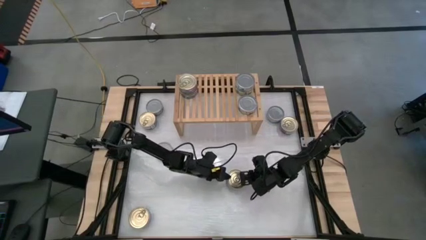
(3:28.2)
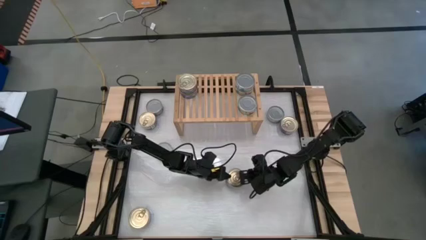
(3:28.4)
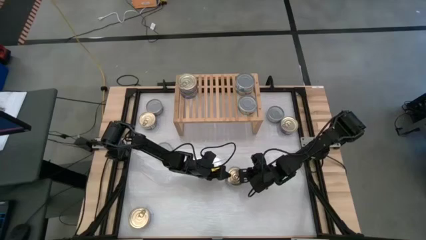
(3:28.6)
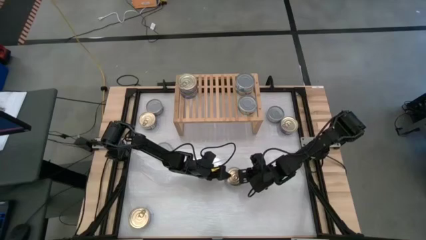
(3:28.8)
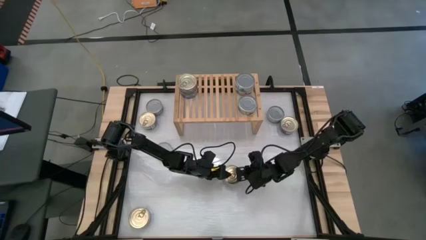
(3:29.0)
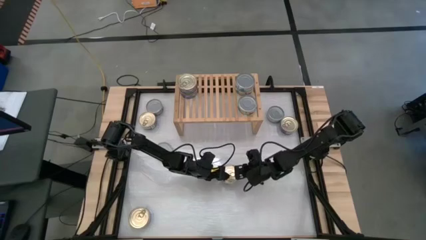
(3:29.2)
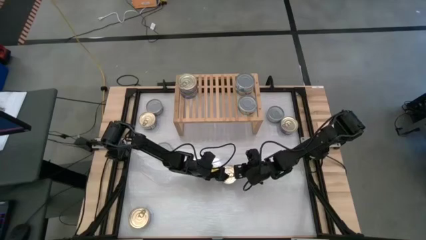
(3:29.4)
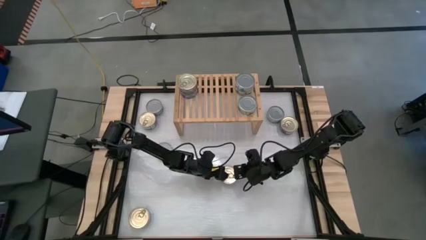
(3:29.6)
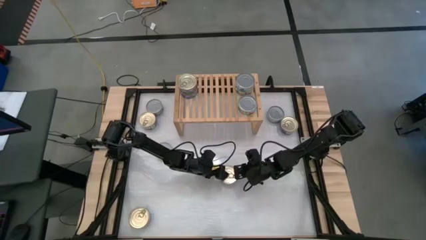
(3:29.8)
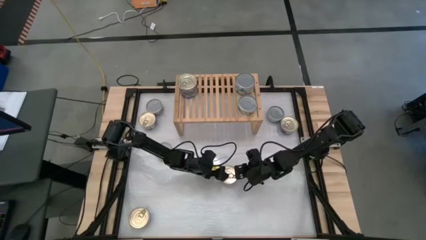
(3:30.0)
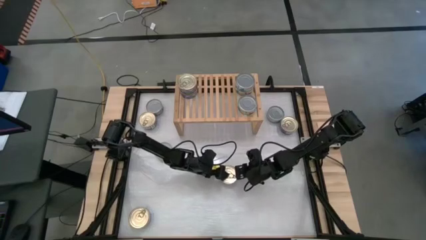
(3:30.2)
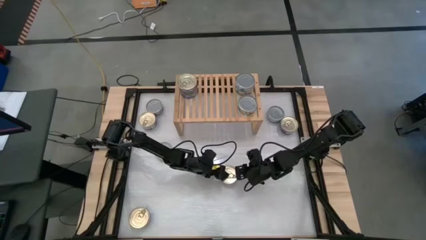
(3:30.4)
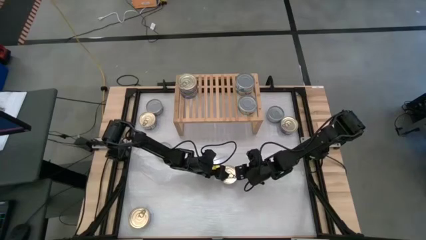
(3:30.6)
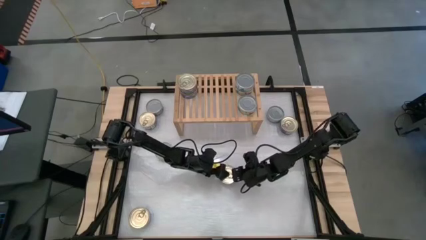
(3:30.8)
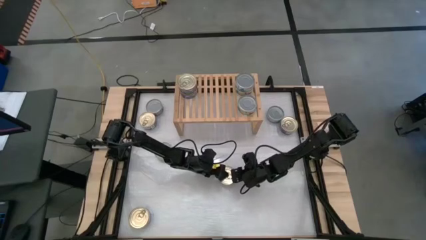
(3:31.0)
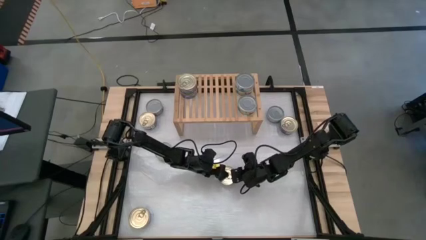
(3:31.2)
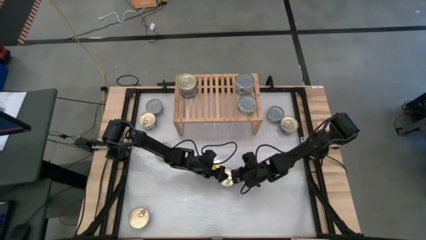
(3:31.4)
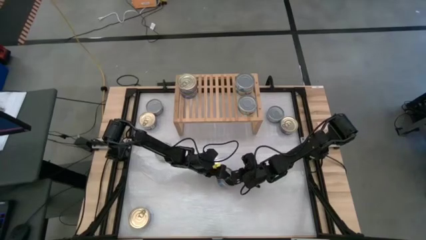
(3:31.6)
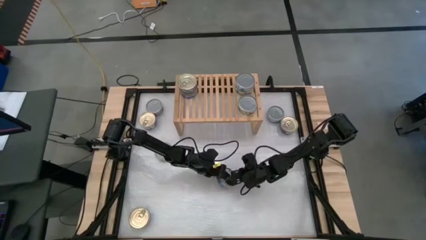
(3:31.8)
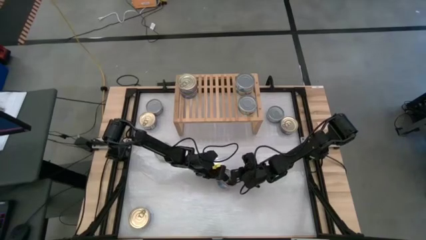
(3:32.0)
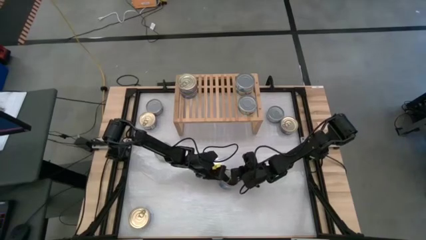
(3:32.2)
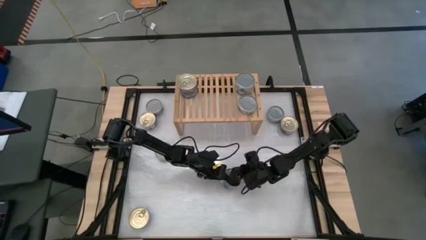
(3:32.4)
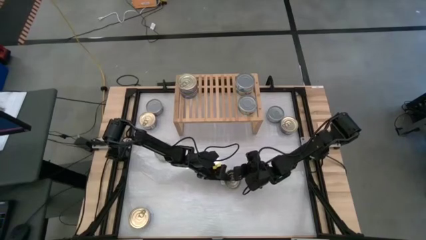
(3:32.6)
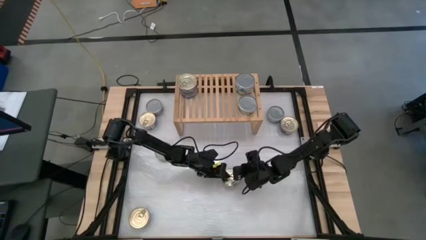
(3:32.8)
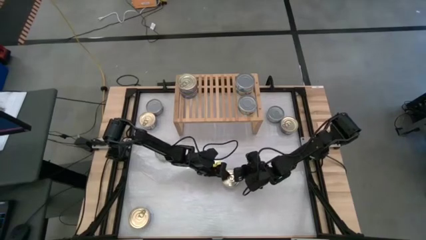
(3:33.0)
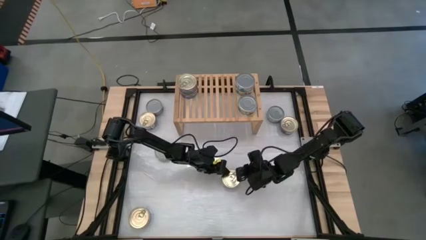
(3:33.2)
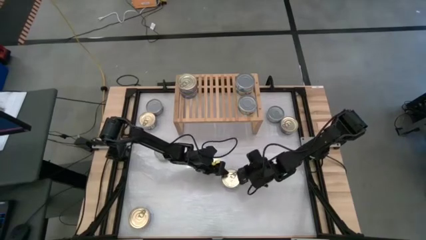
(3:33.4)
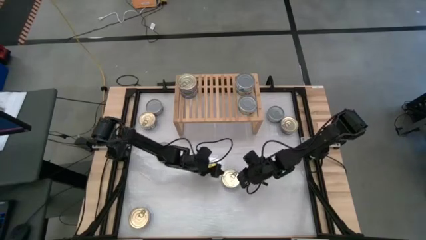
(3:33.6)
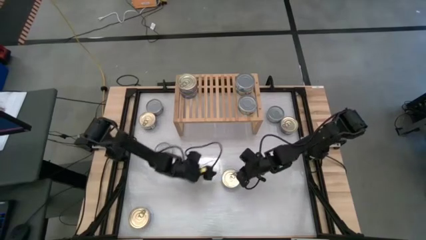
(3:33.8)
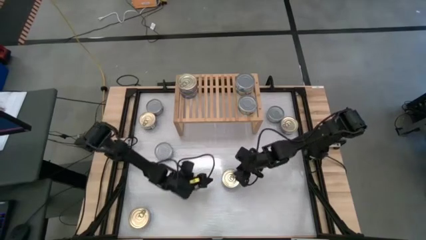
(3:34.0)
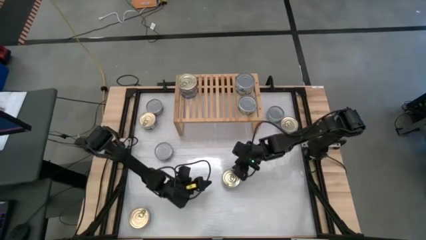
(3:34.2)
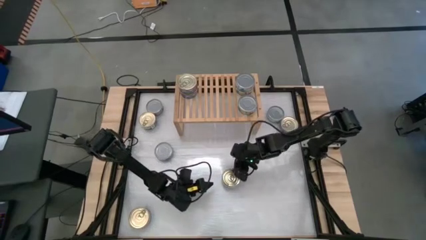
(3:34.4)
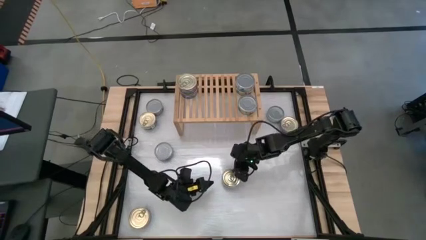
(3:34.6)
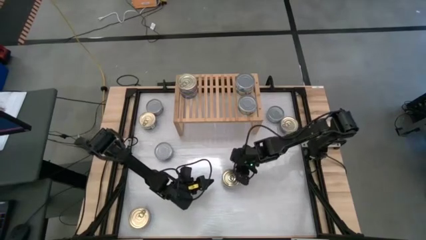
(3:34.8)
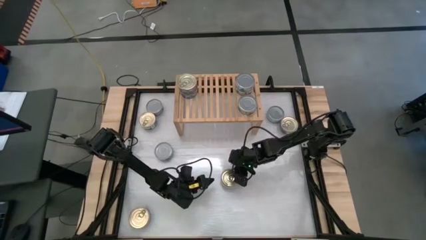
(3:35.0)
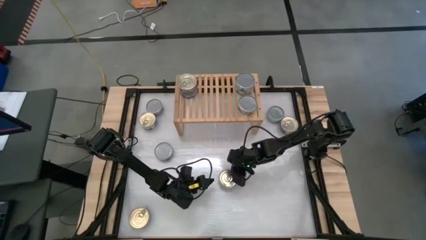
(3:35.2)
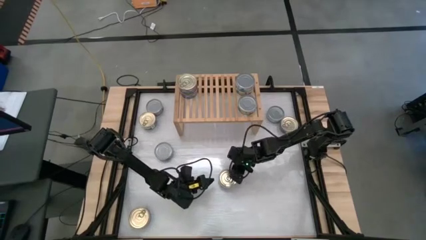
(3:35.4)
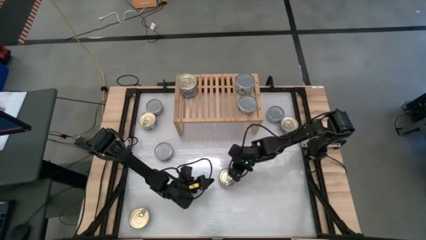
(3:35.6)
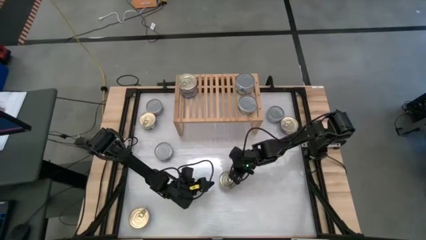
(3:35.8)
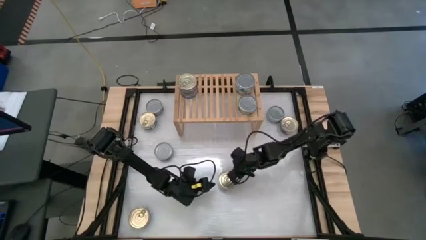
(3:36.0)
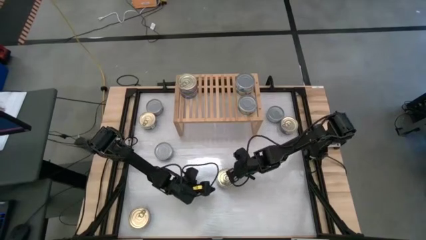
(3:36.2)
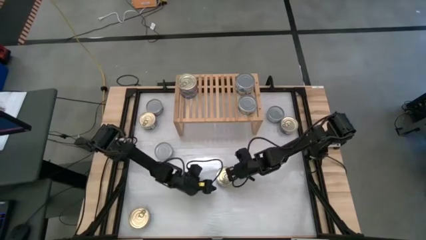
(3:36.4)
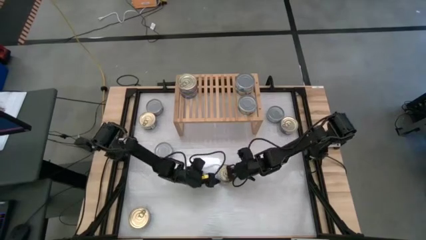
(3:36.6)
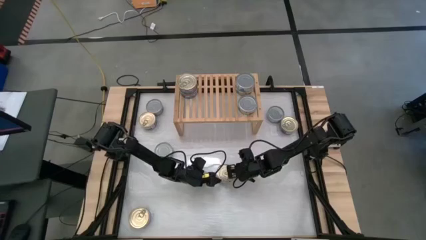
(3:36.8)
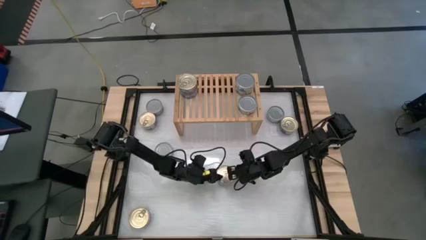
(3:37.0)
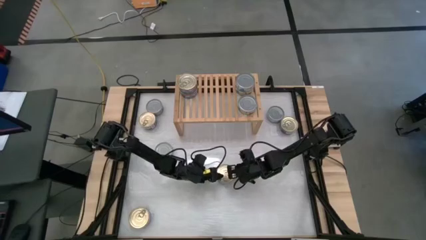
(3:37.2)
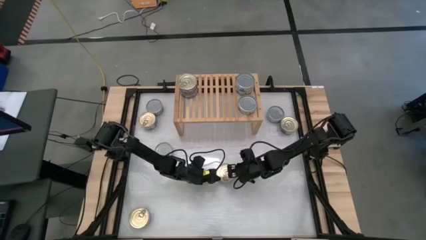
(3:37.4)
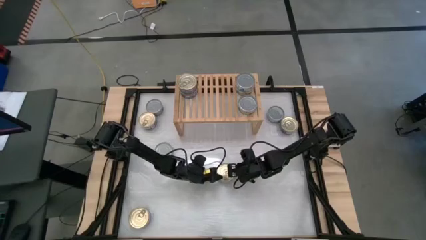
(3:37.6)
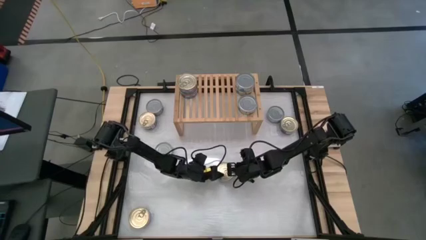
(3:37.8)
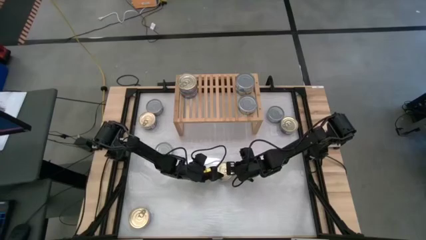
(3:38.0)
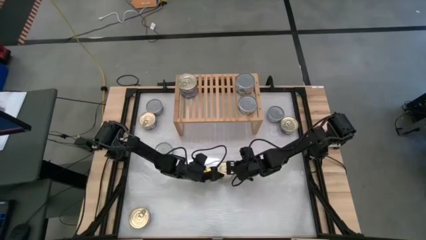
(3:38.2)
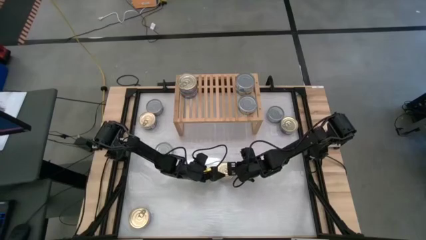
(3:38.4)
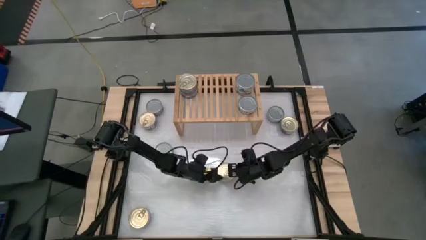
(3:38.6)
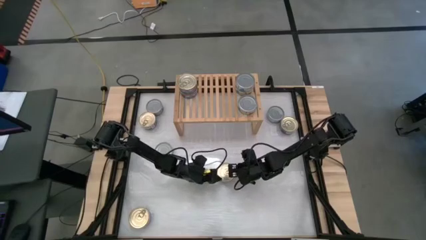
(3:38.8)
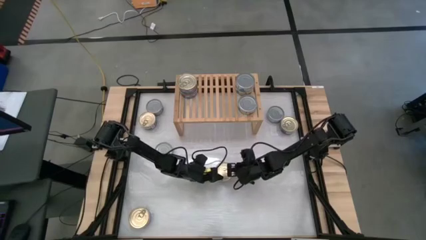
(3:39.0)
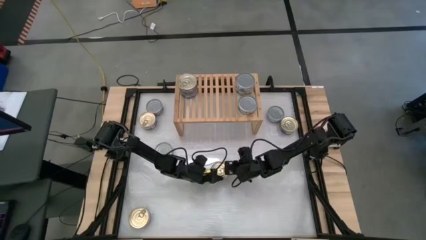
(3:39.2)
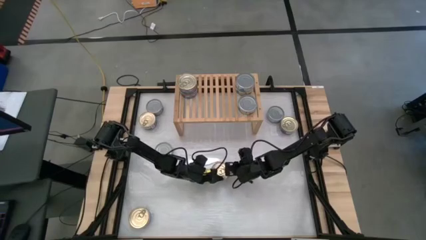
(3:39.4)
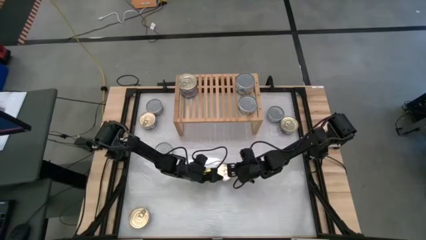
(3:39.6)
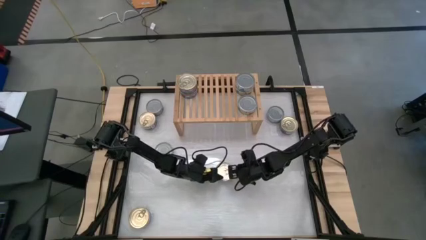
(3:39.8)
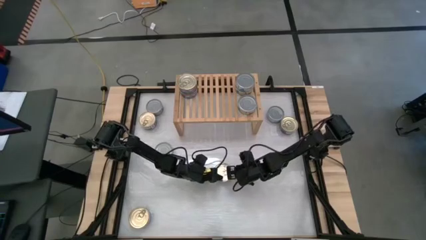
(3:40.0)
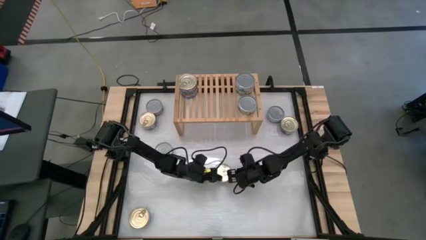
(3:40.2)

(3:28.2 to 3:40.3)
Task: Stack canned seafood by type on shelf
Put the blue-pink tuna can on the shelf aligned with the other blue-pink tuna cans
